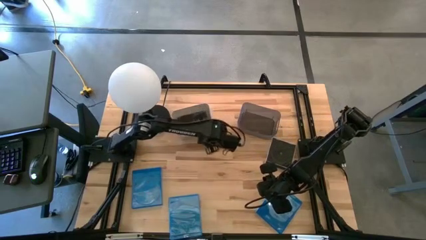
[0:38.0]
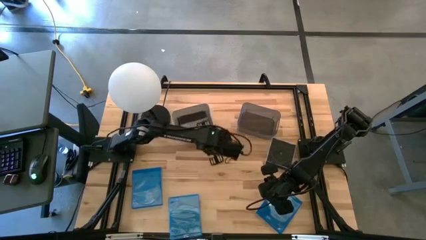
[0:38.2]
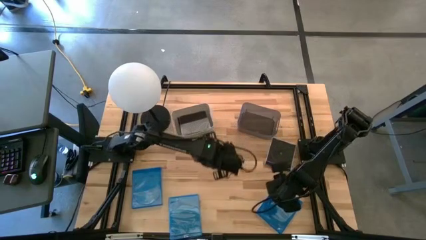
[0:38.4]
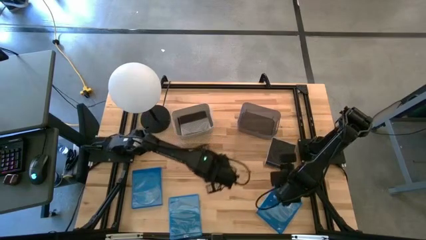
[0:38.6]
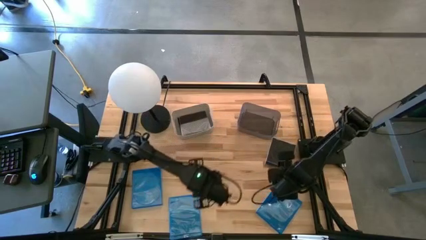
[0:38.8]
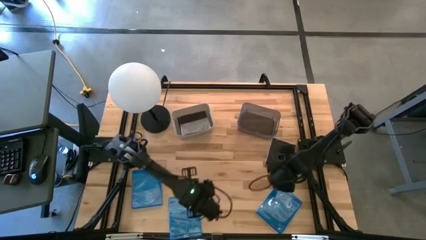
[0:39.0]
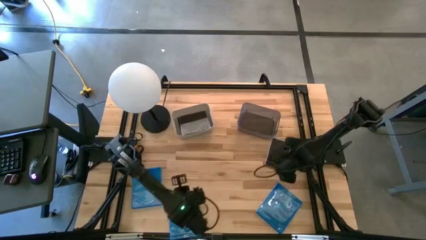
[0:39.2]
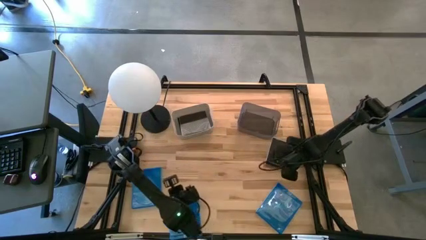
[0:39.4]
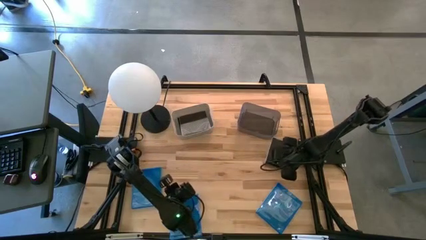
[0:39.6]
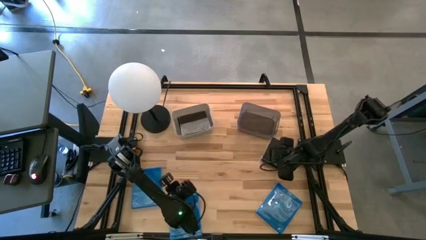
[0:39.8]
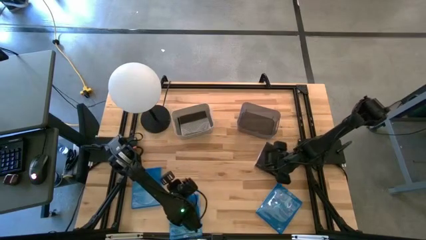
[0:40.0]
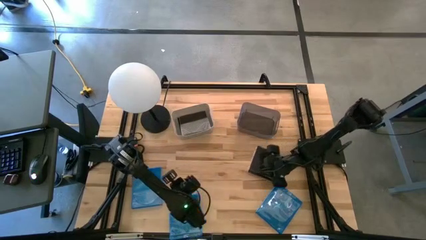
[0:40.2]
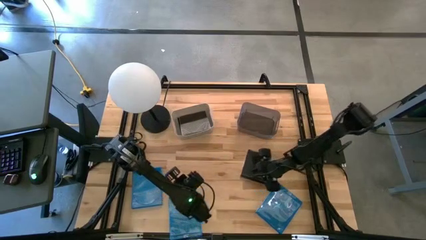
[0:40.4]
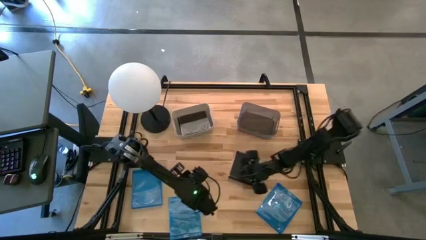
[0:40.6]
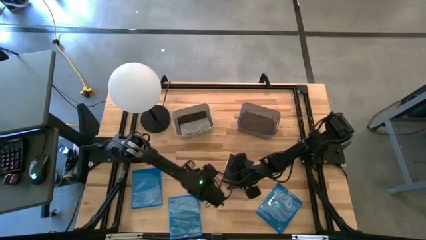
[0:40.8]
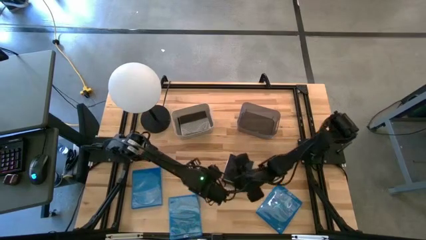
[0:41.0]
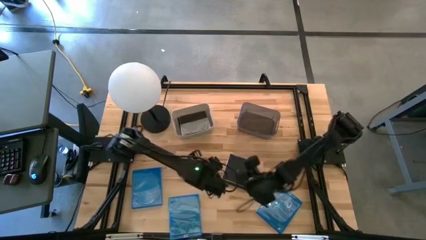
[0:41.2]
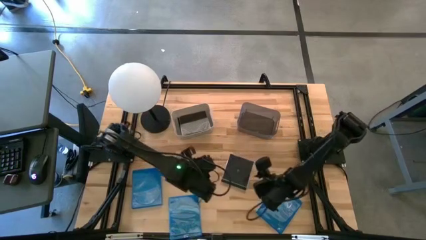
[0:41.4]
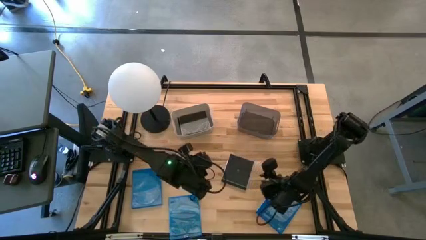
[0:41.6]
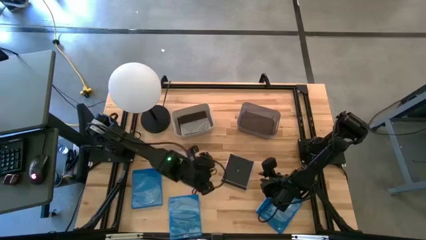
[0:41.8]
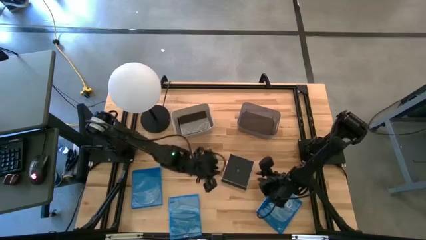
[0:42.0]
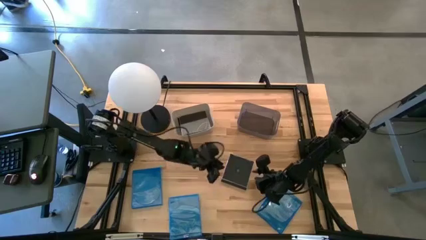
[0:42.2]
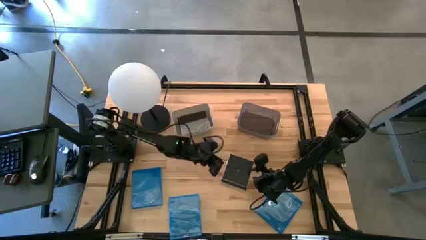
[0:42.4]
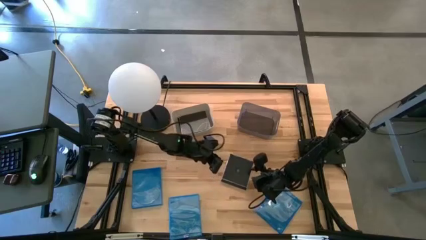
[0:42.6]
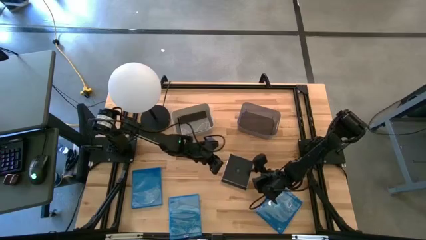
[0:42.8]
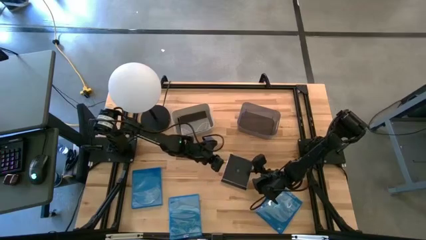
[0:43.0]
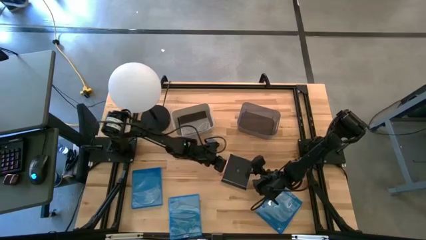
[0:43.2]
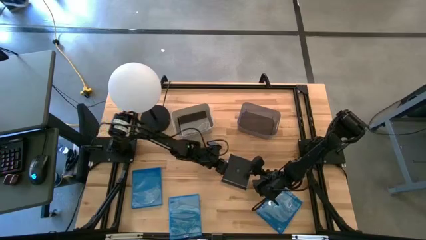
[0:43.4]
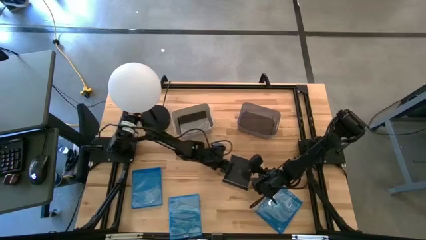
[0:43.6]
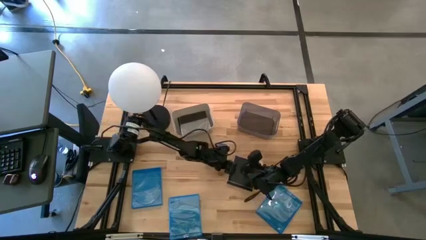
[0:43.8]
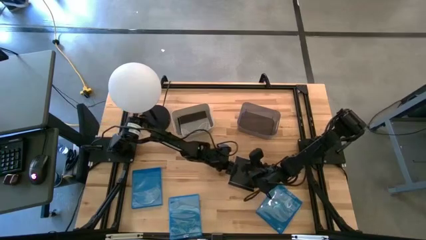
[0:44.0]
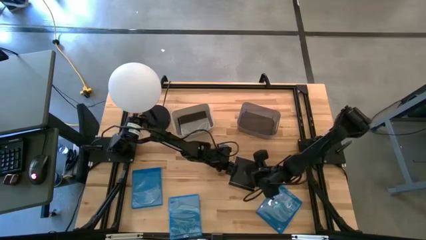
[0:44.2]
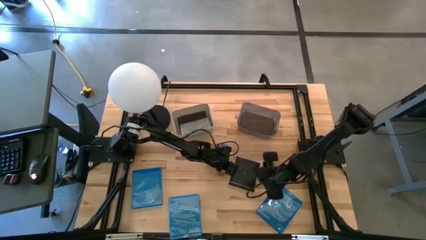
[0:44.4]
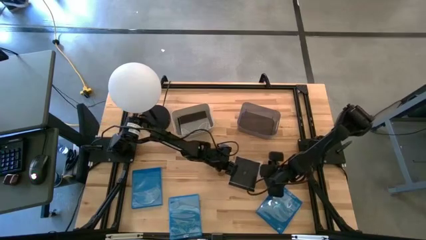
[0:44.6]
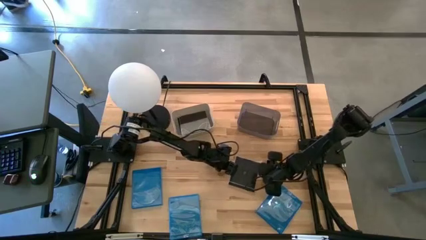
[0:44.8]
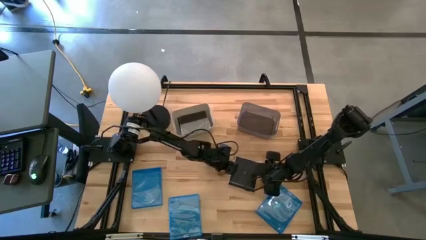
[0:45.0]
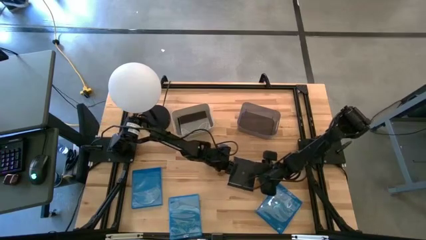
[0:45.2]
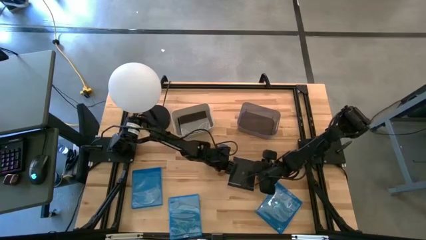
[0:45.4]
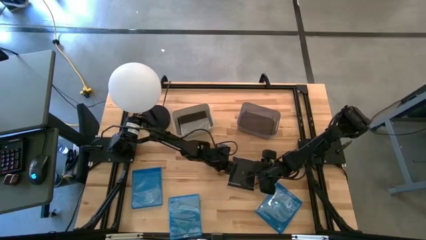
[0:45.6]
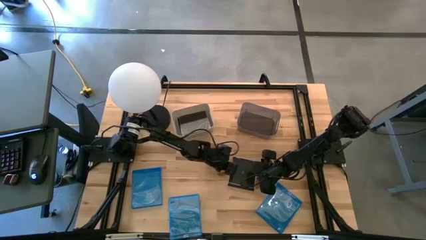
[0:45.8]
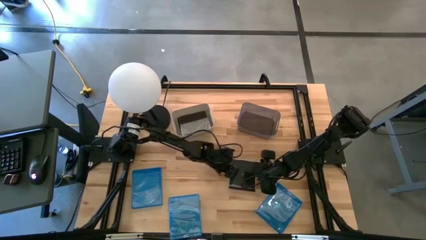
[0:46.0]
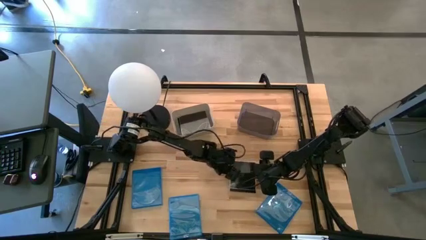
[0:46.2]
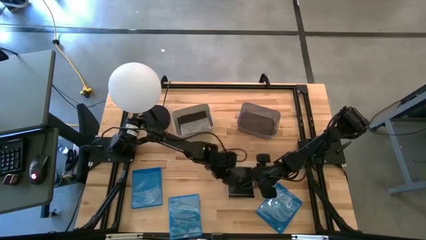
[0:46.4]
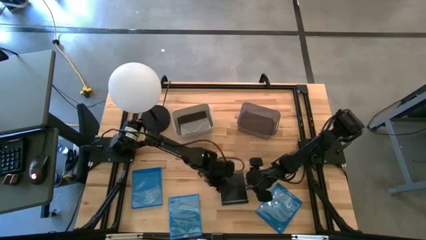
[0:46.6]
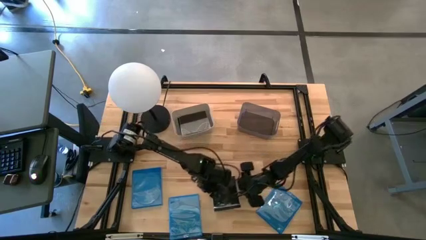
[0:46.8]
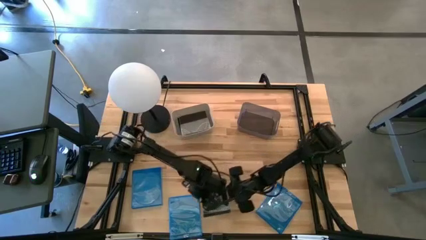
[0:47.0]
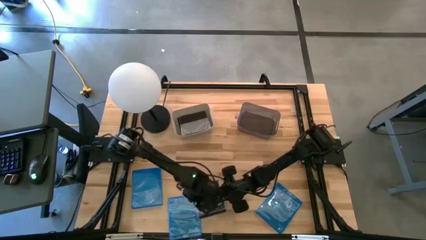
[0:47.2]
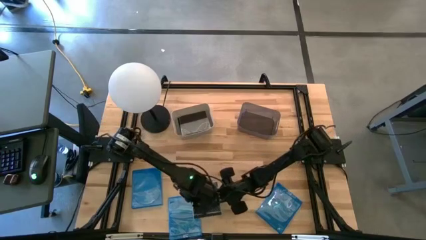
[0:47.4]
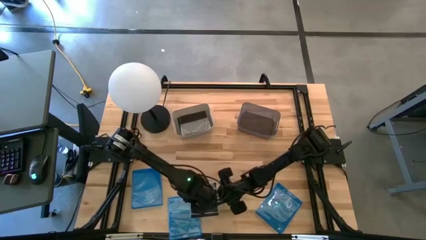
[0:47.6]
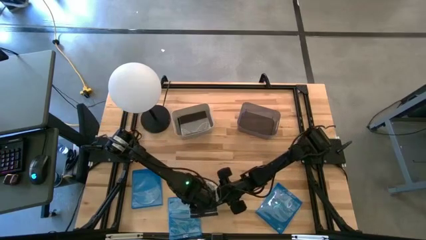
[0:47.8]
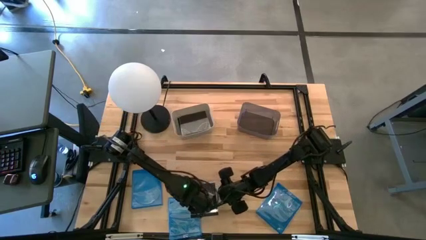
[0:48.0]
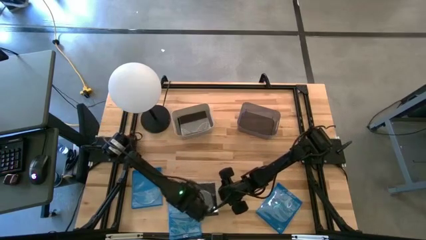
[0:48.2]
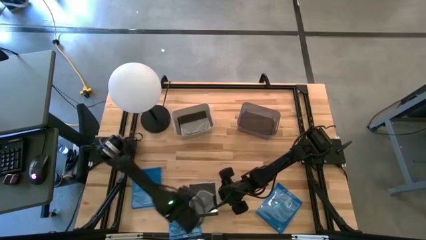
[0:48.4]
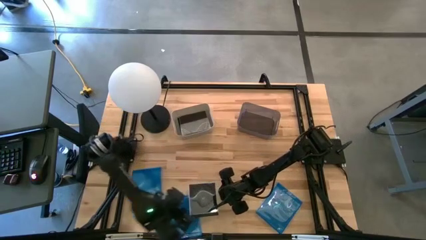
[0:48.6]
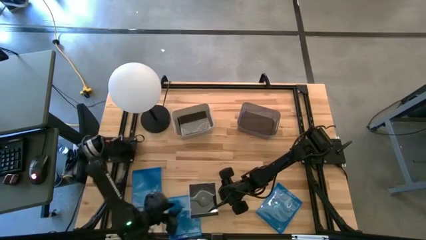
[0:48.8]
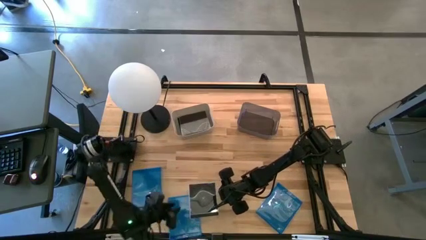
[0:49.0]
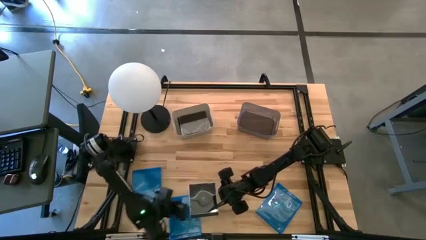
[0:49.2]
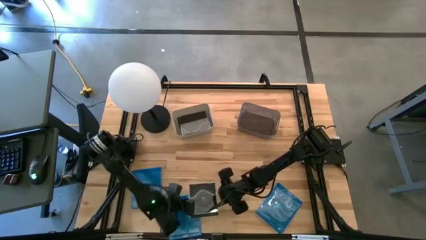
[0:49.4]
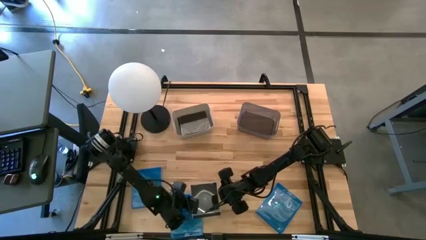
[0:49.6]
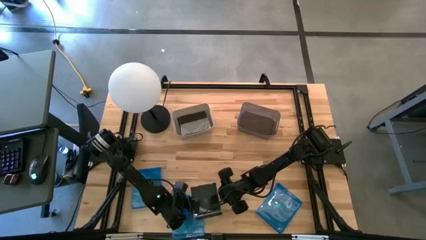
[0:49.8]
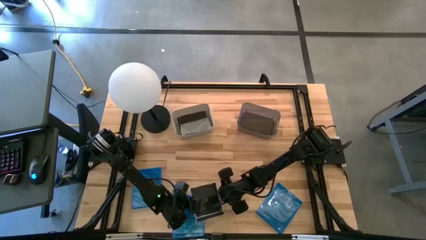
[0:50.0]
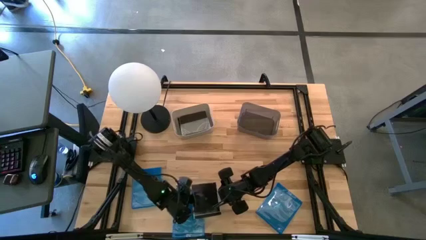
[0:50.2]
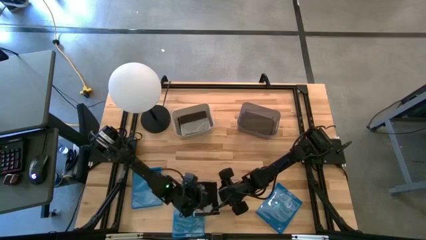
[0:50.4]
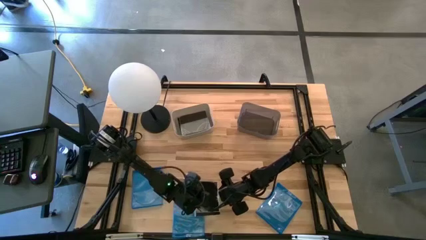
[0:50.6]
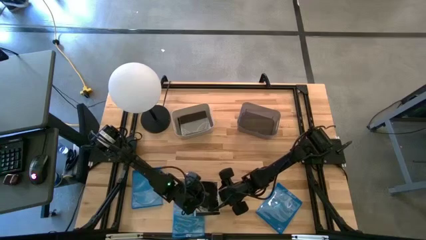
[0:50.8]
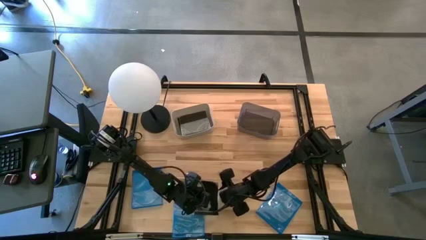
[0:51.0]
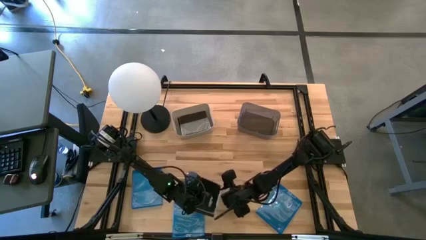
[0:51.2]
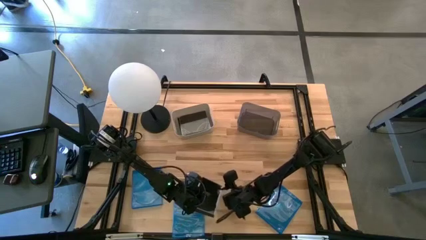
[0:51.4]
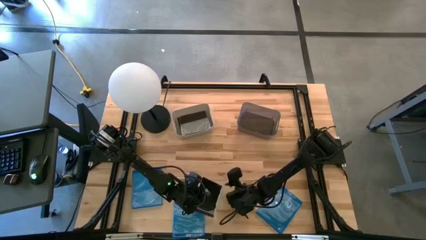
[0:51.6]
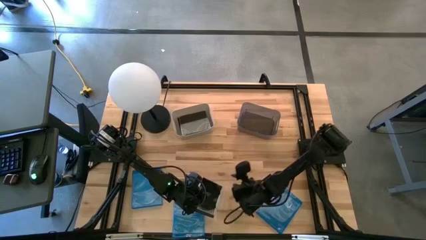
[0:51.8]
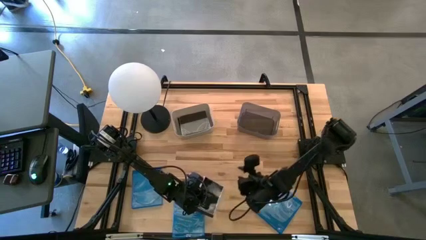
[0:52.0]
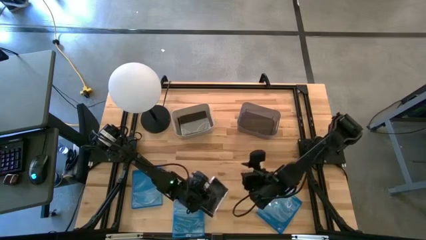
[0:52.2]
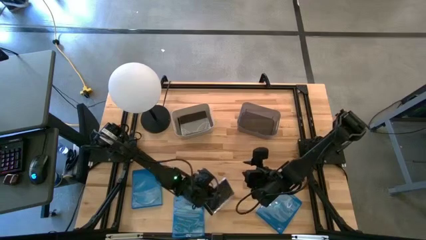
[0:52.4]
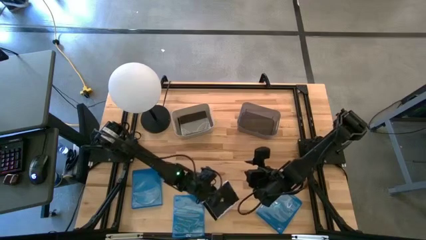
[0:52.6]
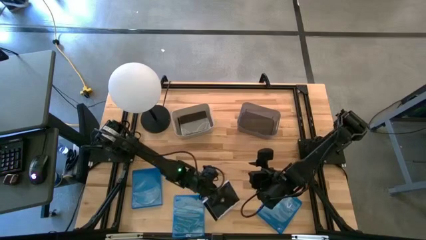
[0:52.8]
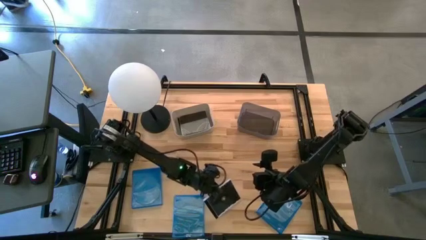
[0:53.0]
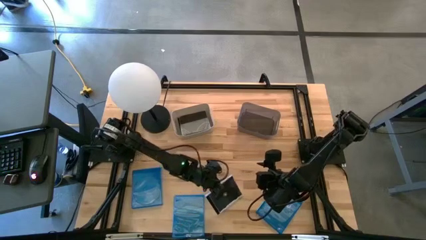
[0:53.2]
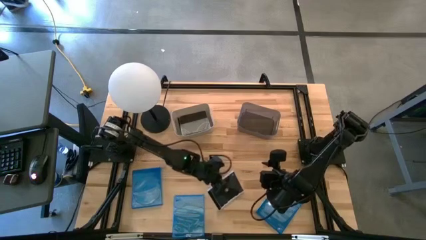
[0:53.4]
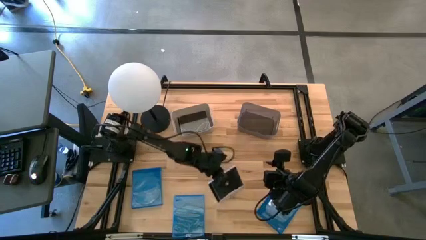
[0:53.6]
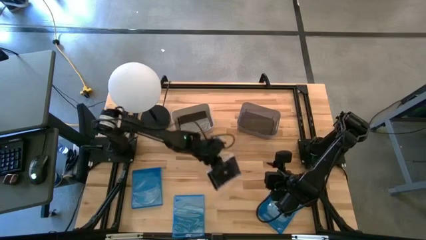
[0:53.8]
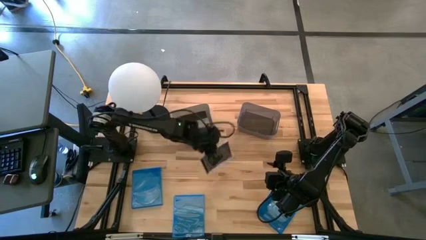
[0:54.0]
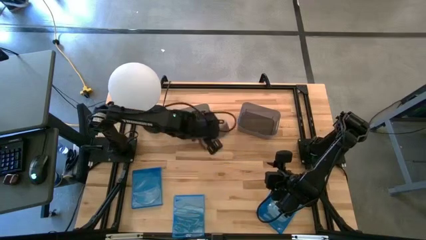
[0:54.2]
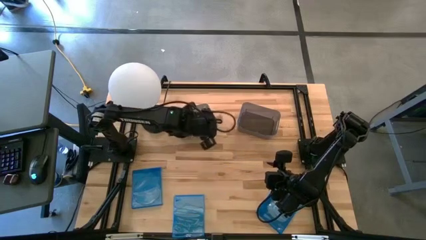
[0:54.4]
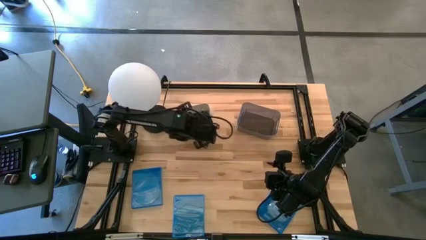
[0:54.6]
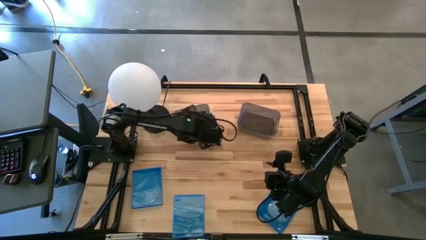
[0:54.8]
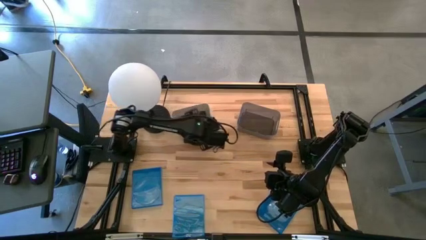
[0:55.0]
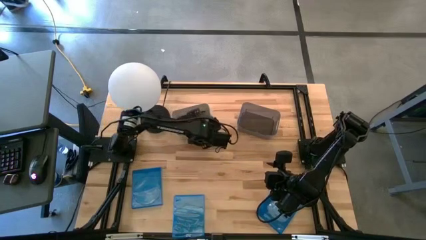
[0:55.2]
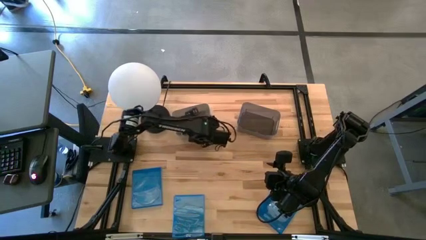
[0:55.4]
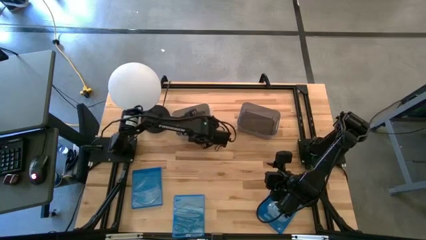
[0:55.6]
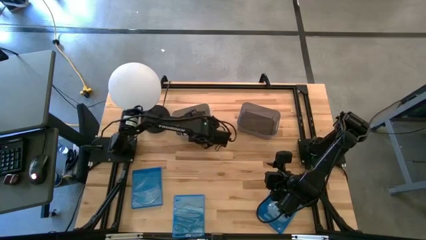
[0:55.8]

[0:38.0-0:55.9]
Task: Pick & place jewel cases by type
Put the black CD case into the gray bin
